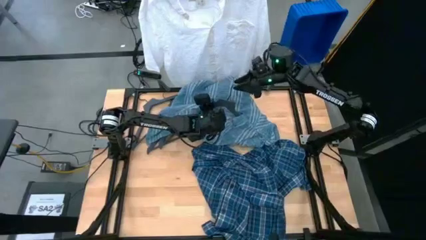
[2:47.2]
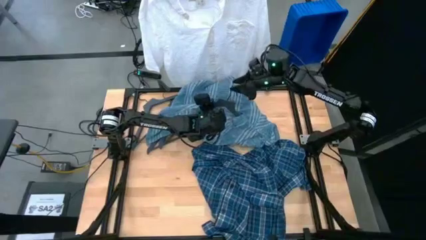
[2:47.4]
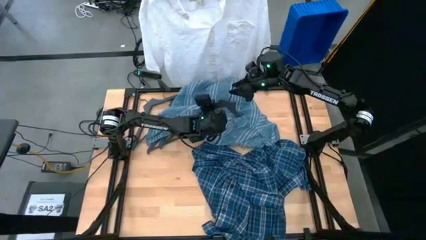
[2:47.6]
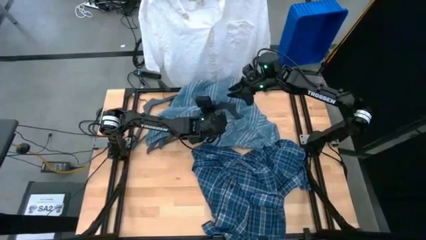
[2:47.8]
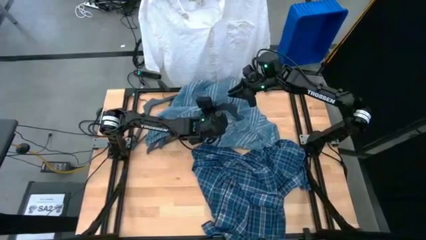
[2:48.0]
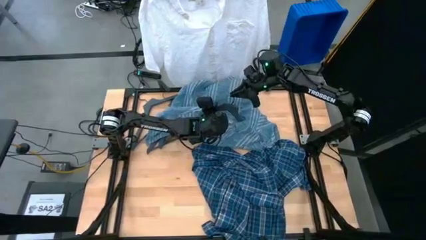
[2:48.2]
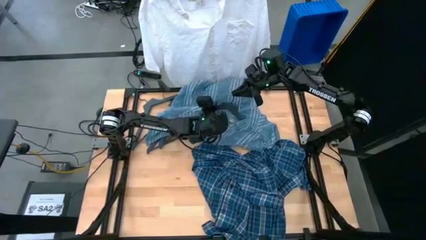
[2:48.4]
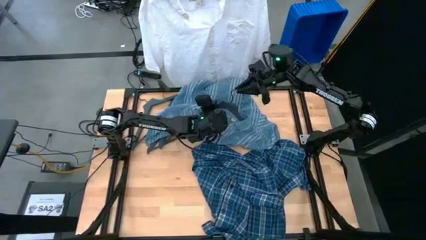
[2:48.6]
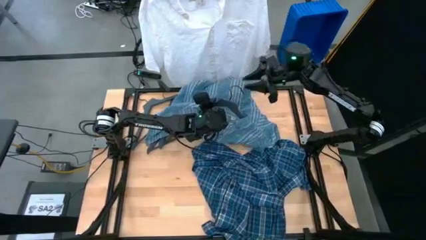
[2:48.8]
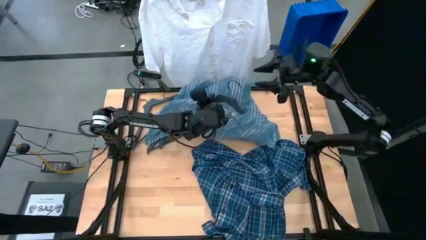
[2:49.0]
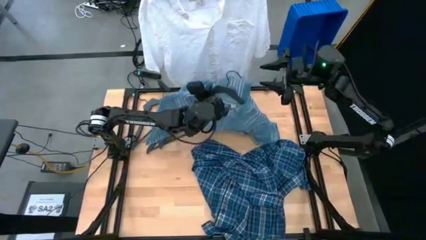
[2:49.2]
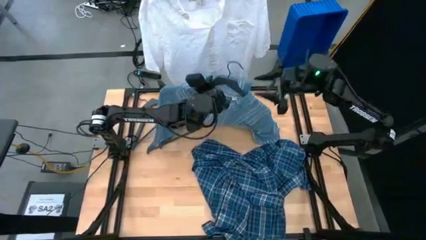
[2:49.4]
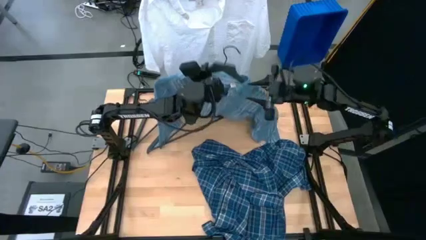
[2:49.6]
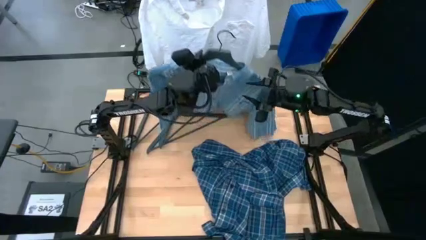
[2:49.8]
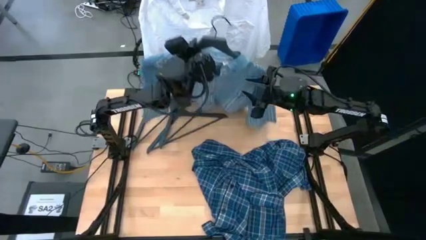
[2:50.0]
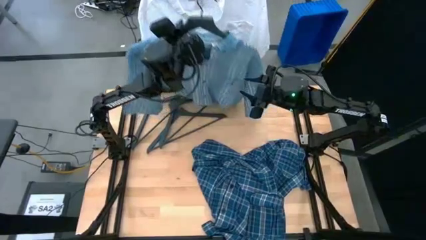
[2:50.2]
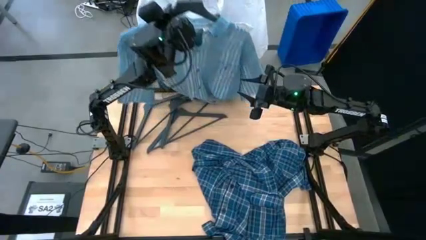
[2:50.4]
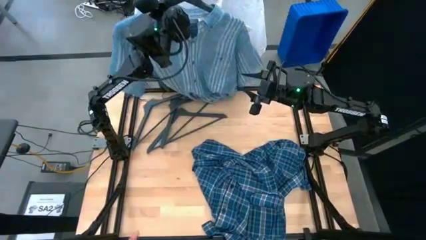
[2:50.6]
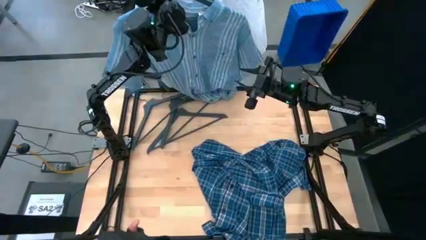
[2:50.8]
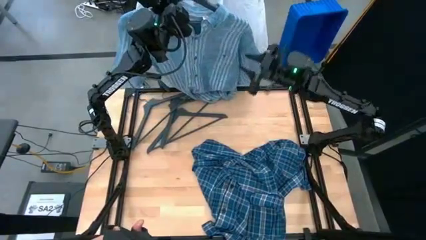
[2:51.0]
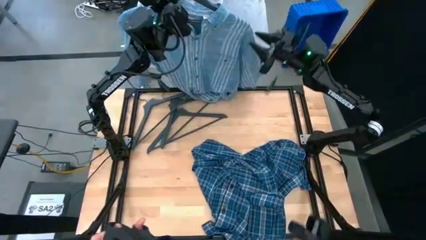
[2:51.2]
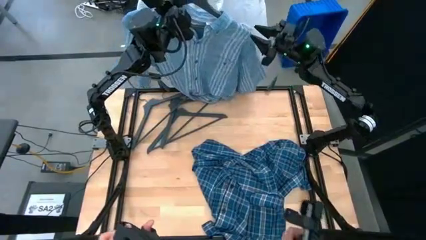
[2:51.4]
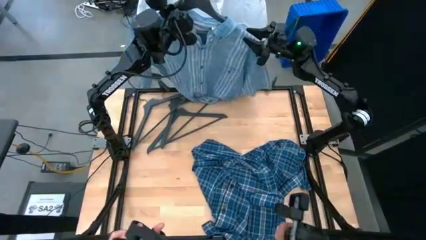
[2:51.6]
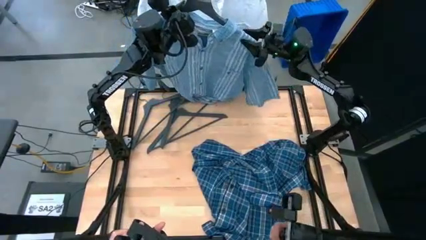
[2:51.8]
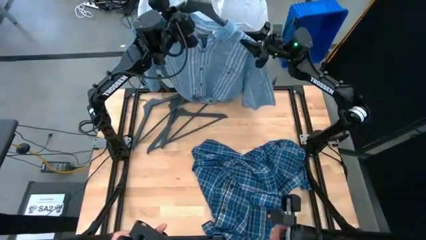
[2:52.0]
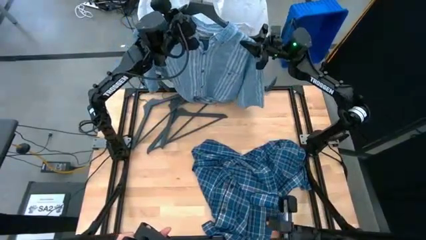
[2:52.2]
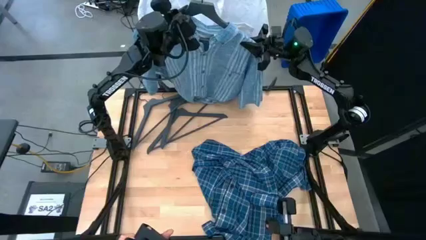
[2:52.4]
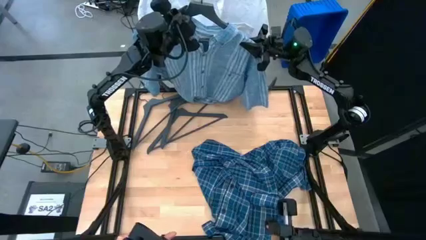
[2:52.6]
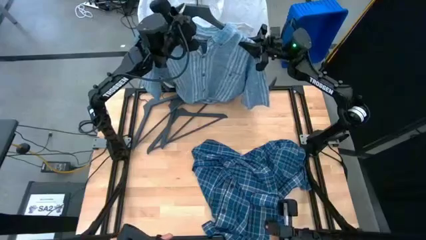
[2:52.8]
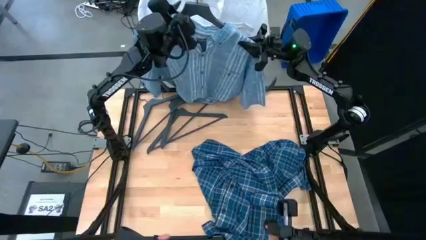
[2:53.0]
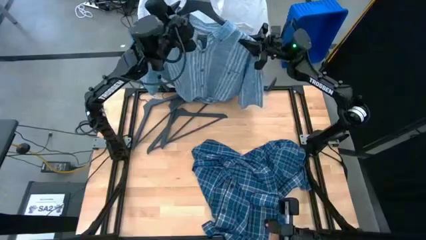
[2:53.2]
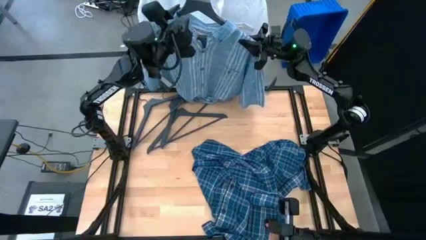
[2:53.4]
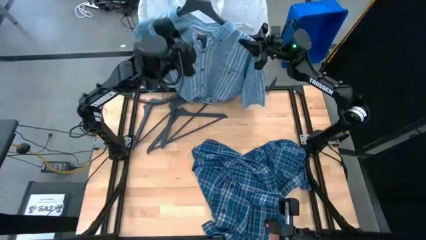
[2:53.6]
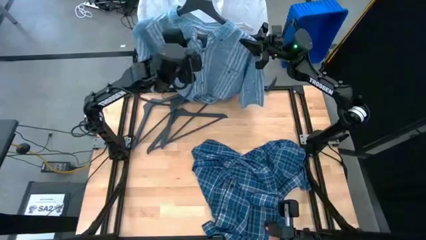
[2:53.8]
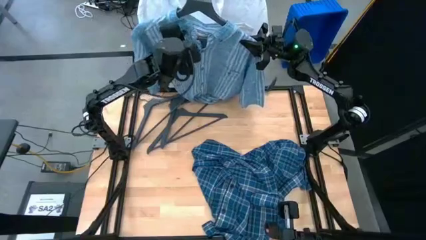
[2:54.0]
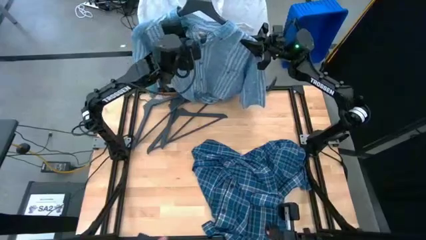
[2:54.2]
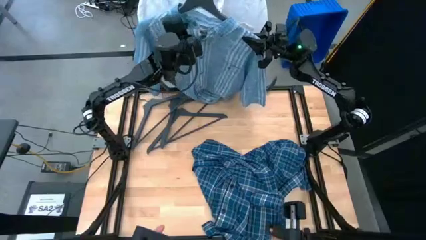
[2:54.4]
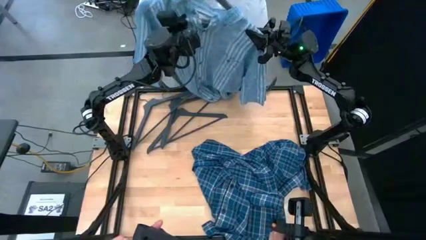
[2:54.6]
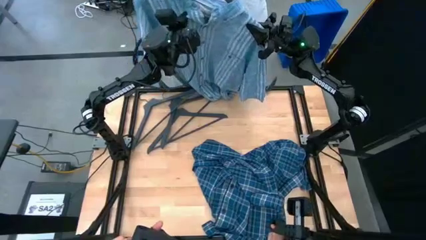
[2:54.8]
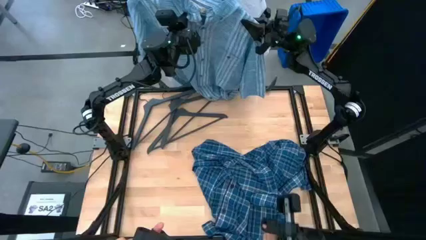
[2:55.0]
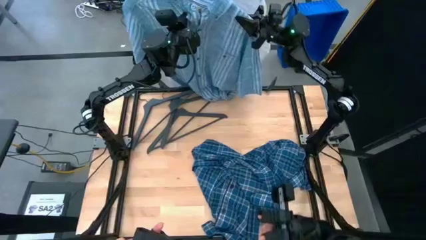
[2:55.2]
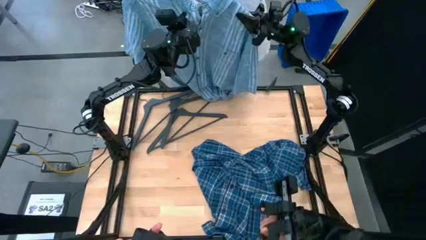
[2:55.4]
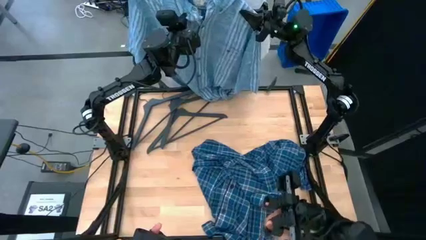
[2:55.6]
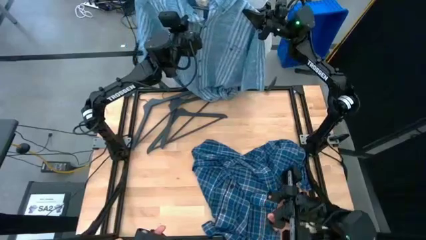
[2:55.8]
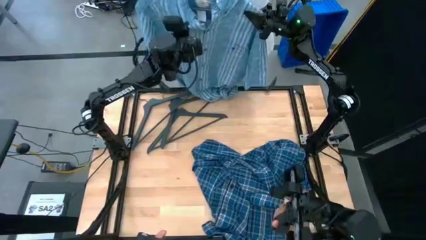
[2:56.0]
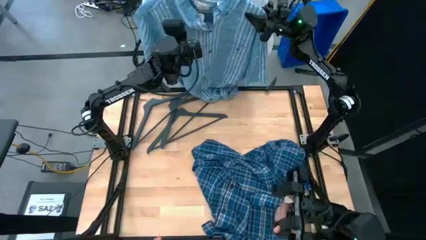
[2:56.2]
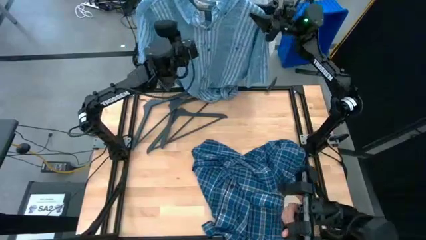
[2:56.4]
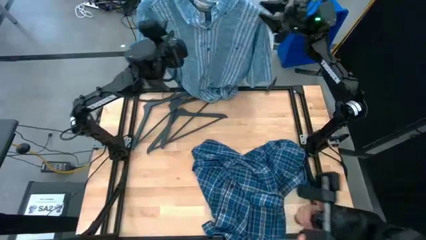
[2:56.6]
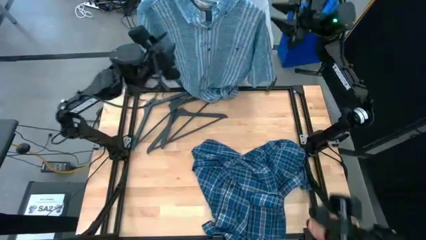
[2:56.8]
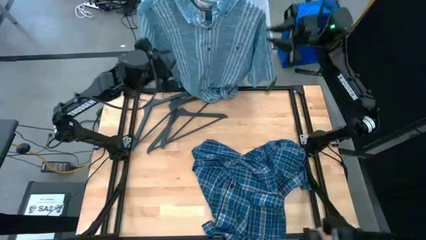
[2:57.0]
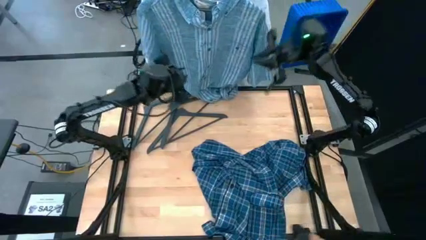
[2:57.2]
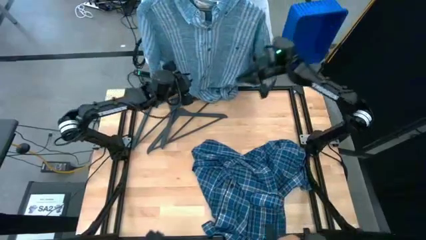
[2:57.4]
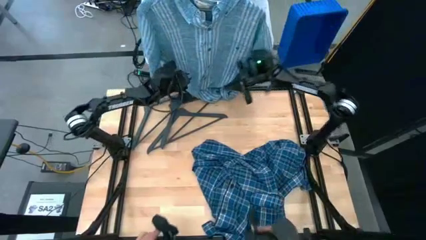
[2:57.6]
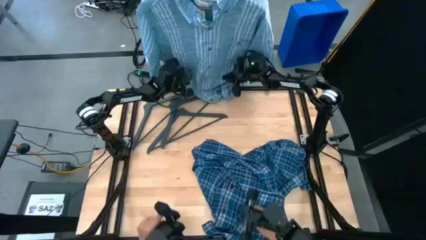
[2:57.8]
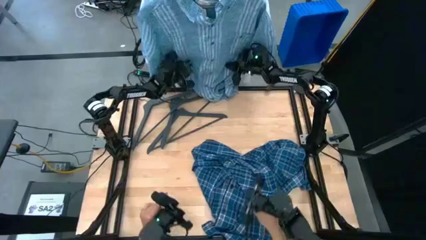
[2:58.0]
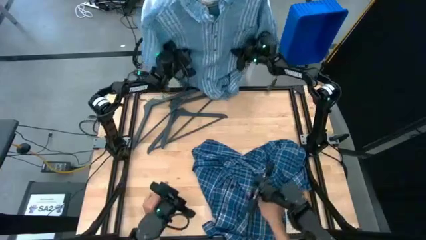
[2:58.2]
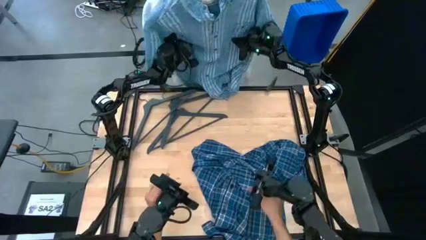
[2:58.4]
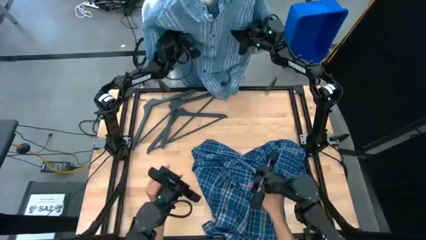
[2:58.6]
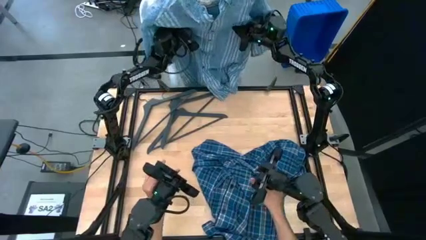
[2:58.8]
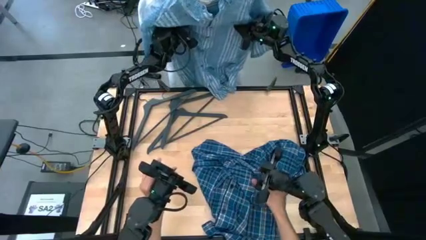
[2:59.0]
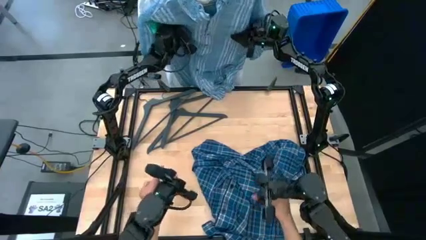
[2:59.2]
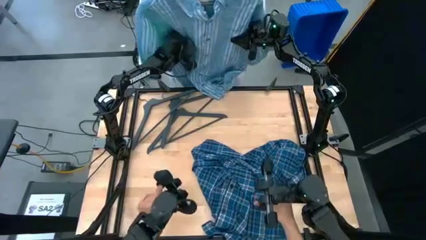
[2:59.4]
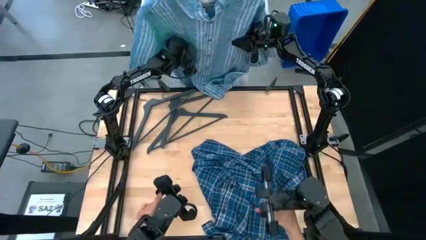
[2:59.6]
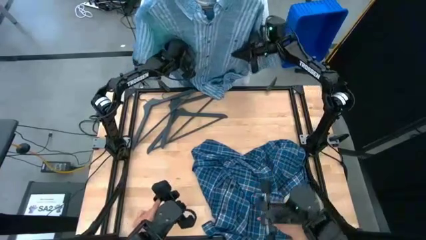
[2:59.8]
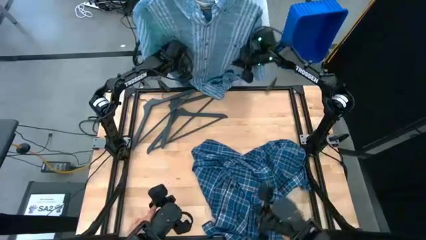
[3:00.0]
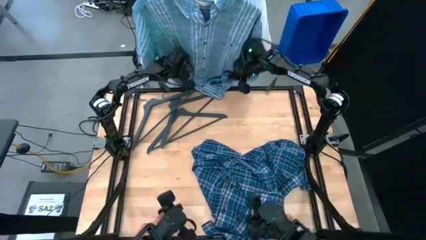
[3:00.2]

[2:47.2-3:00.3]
Task: Hang clothes
Hang the green shirt on the hanging rack

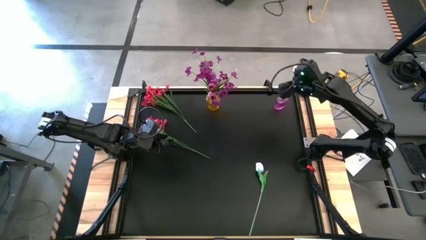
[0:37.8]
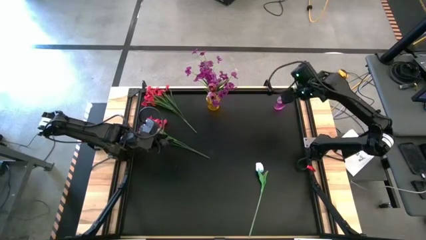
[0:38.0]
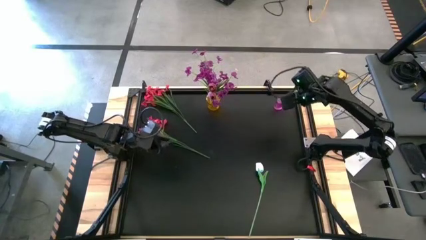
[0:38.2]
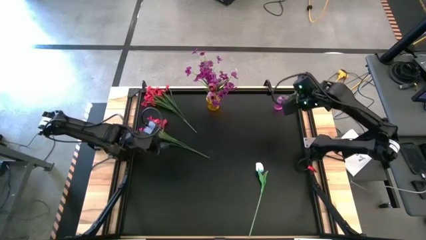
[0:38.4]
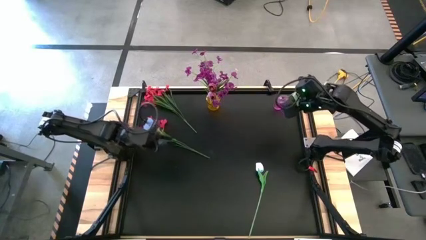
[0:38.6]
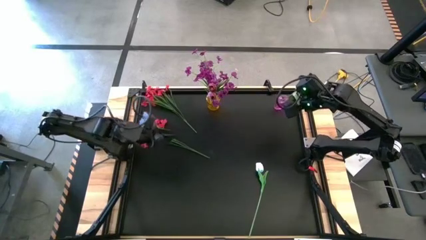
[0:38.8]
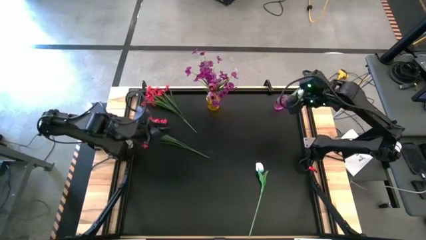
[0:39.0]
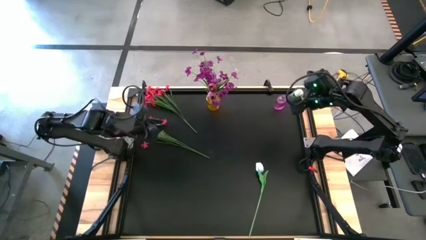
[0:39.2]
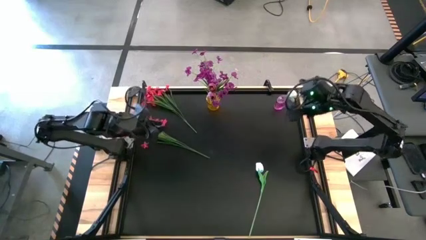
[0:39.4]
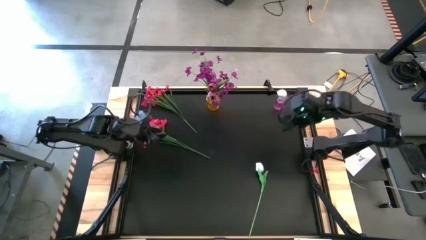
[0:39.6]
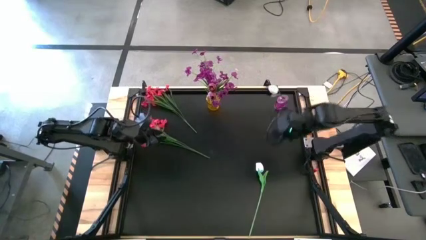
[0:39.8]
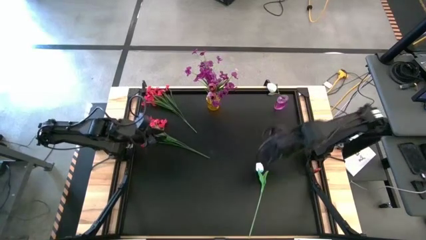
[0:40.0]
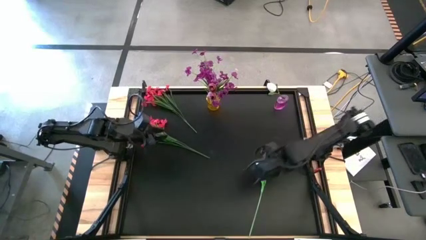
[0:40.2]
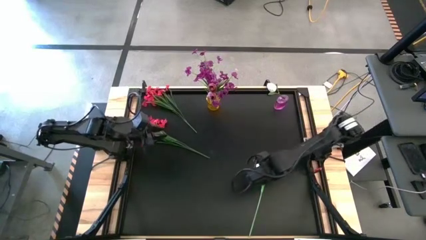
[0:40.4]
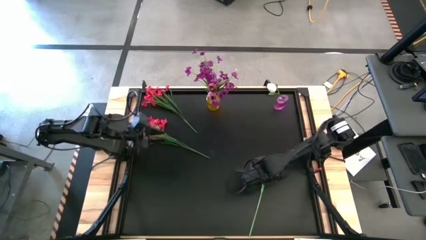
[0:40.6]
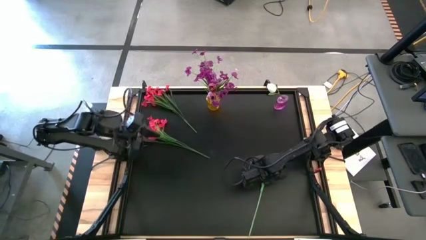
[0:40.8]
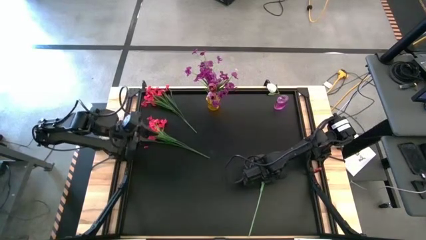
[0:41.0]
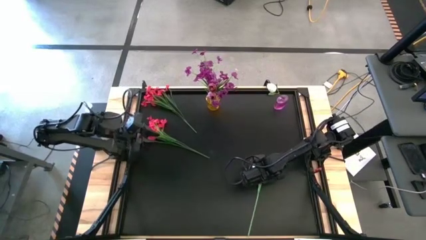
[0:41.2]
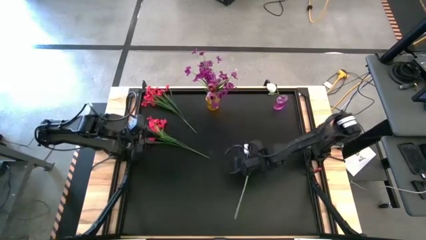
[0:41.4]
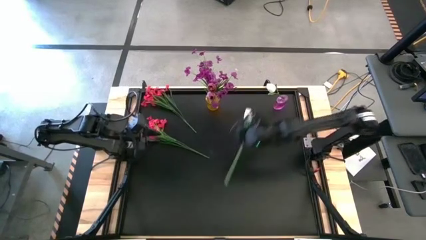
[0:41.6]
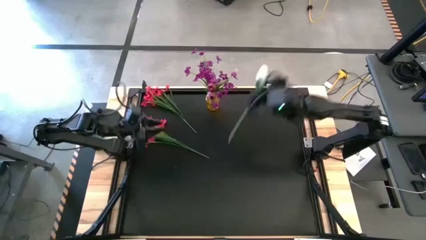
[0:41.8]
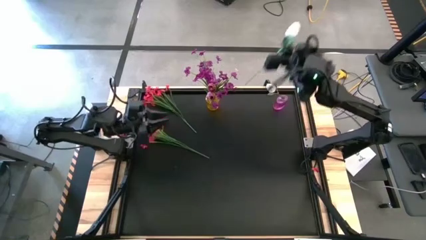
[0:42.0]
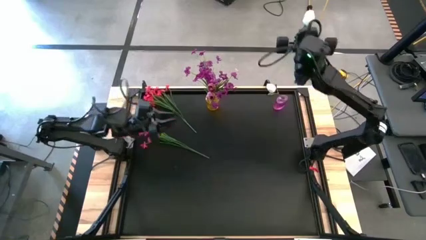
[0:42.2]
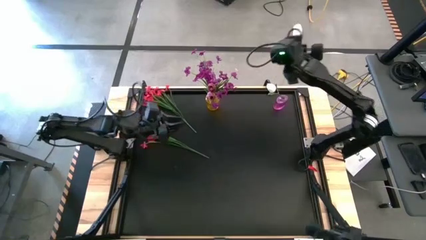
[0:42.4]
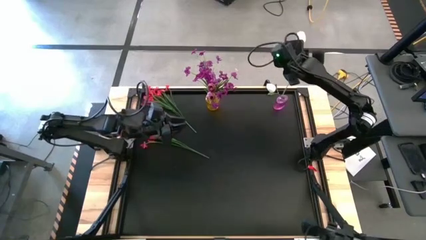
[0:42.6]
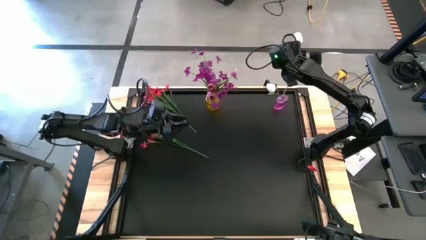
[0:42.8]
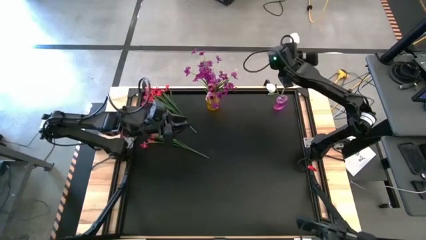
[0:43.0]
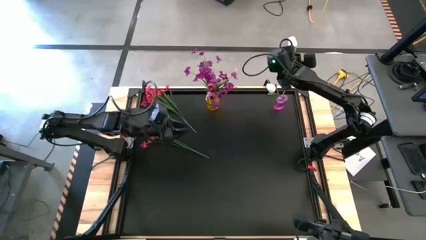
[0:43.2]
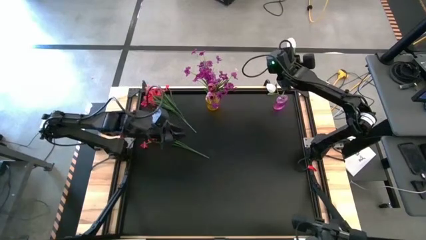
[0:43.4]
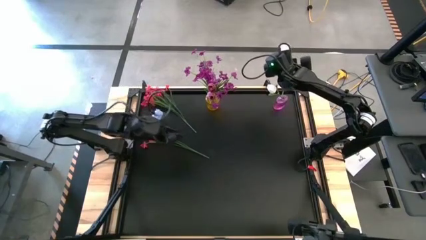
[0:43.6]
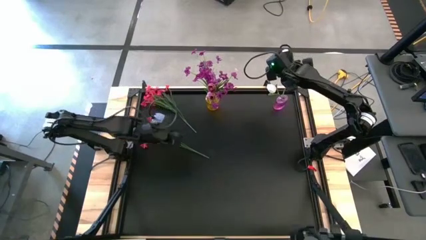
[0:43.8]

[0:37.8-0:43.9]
Task: Sort flowers into vase by color
Put the white tulip into the violet flower vase
